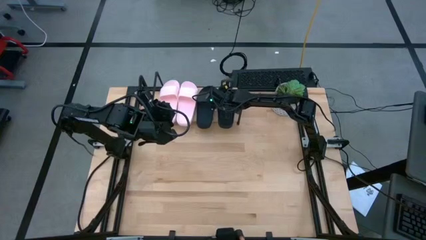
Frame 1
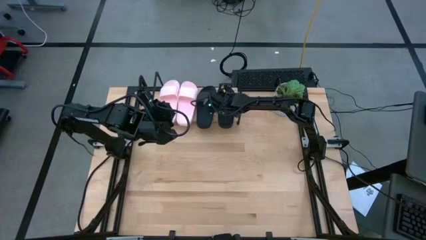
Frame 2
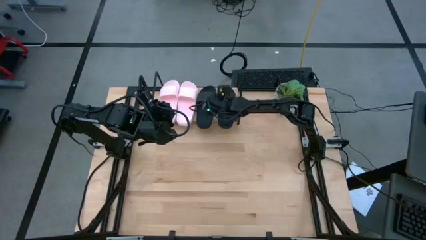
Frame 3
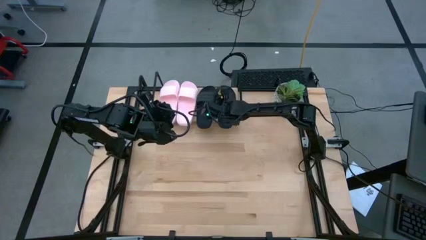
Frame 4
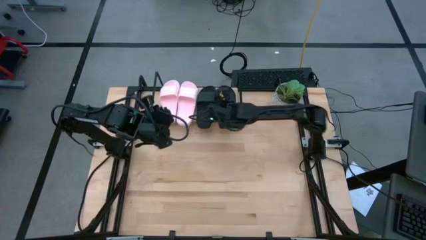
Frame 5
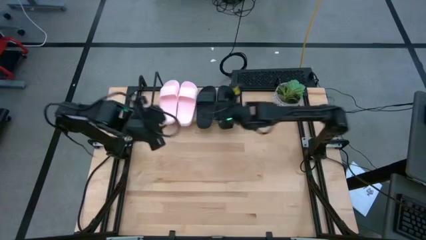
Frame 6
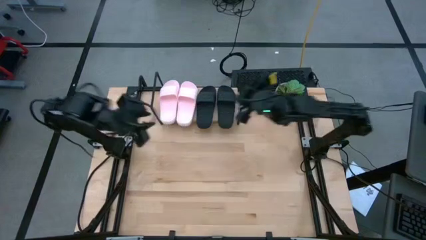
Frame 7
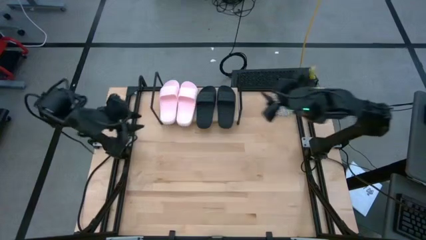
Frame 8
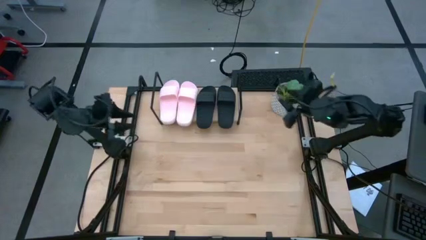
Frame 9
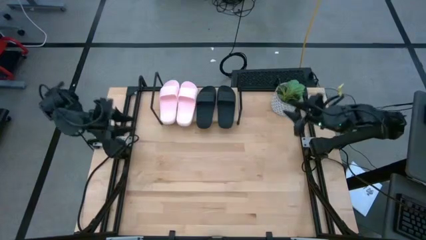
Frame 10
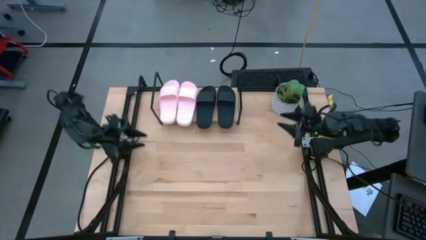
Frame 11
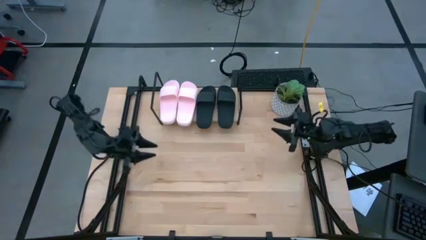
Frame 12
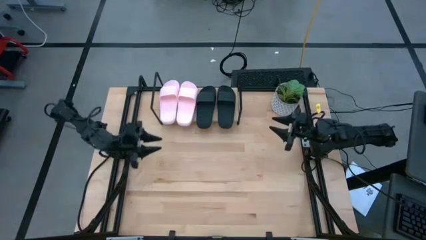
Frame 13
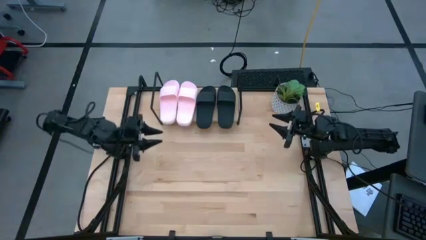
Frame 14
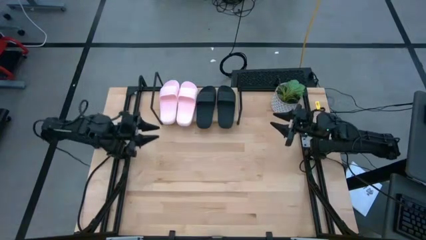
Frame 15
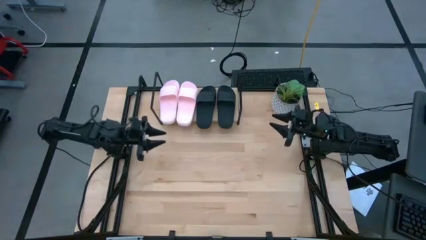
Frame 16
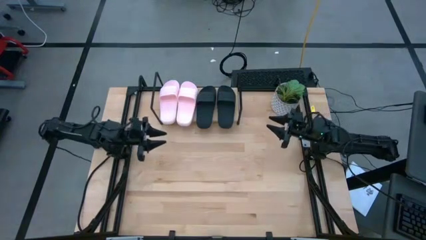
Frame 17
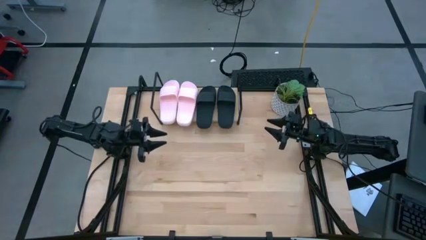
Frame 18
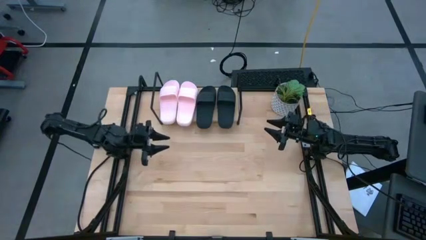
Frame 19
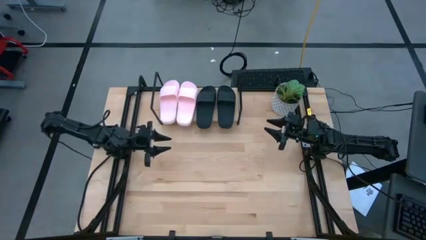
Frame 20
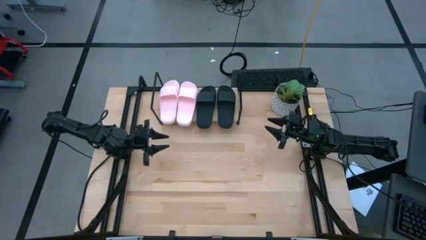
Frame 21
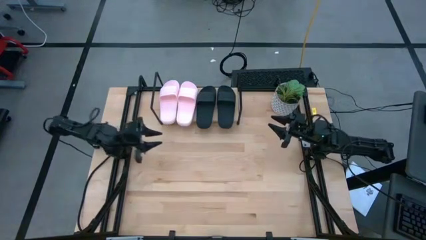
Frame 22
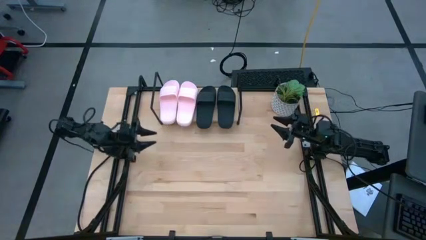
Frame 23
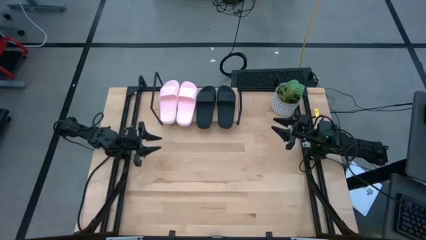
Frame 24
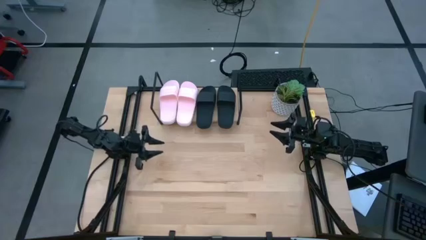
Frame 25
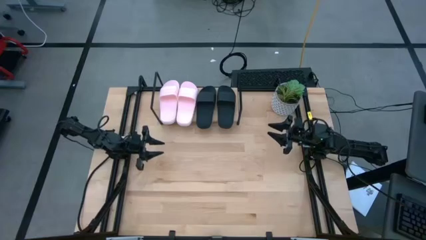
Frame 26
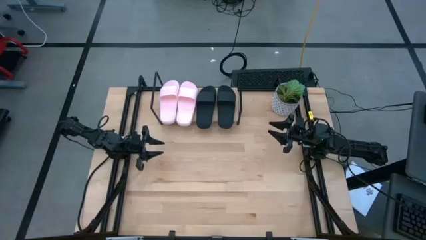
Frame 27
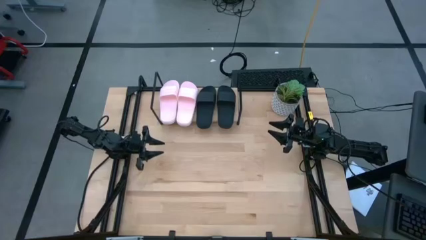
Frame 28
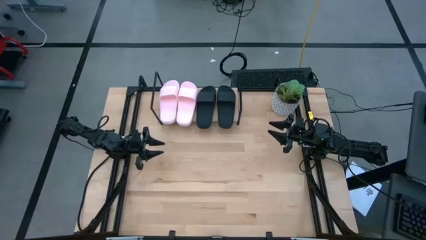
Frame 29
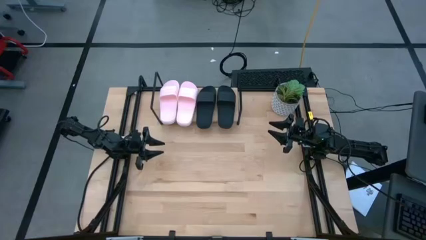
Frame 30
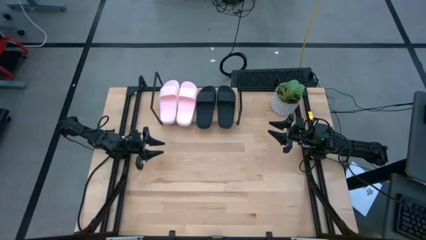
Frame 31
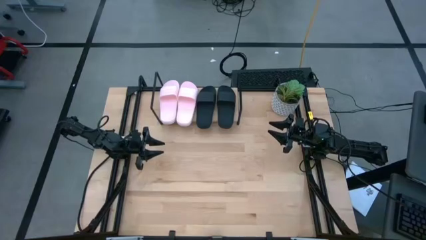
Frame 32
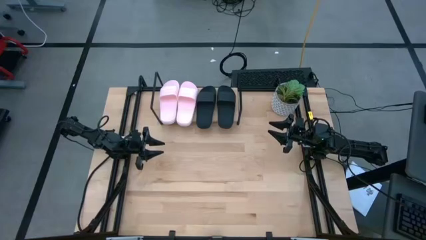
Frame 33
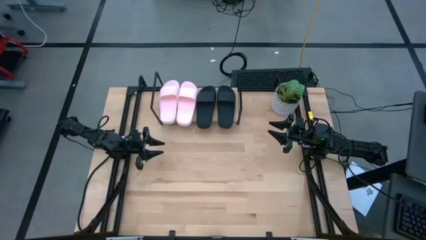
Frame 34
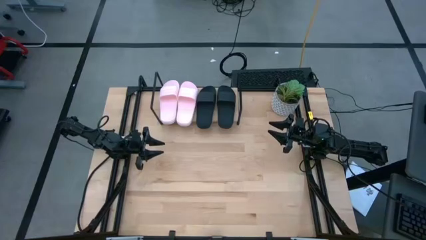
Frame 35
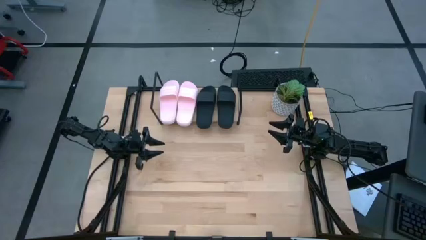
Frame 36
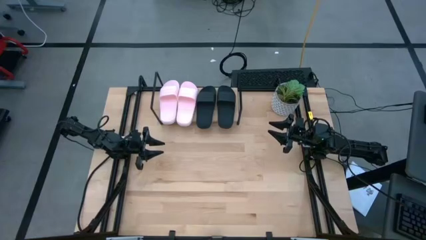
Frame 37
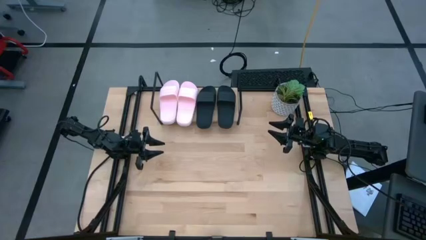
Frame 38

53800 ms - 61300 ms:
Task: Pick and place slides into the shelf
Return to Home Position

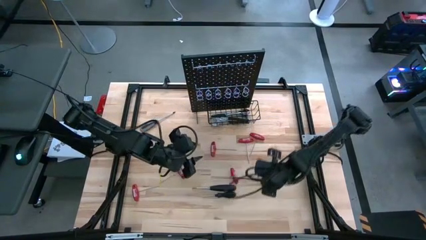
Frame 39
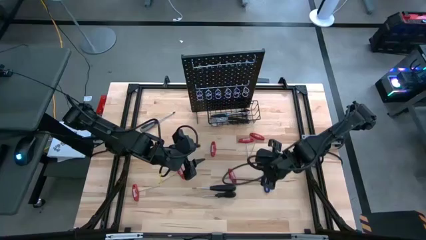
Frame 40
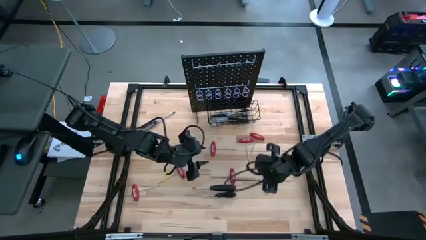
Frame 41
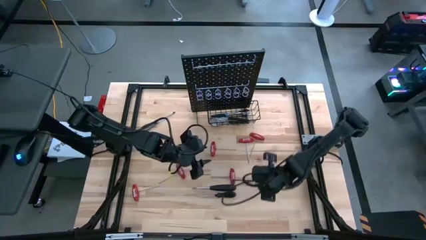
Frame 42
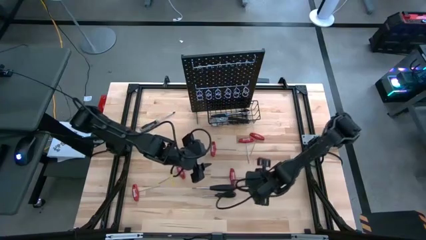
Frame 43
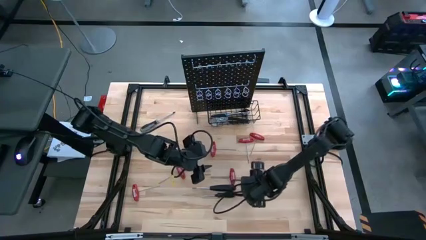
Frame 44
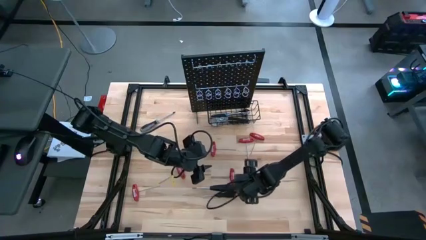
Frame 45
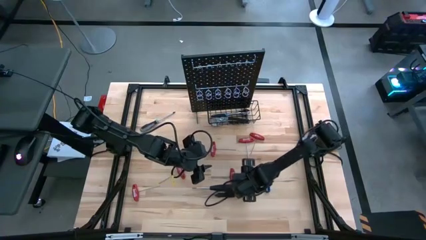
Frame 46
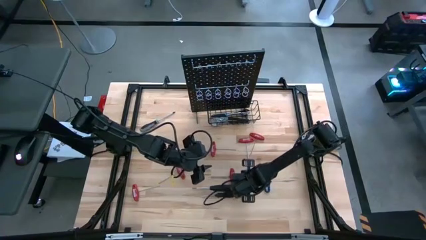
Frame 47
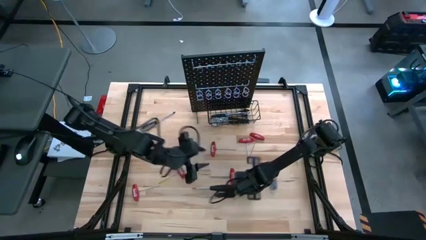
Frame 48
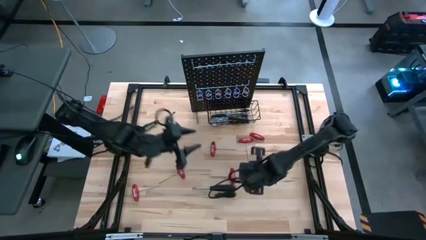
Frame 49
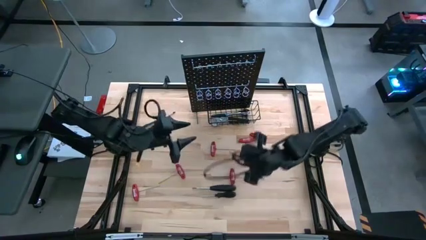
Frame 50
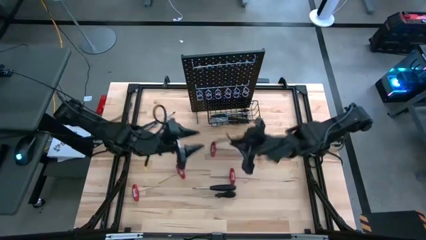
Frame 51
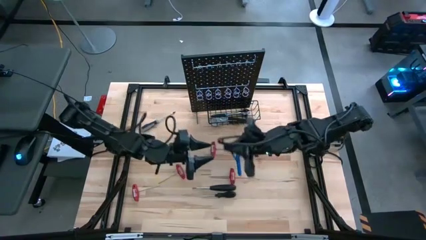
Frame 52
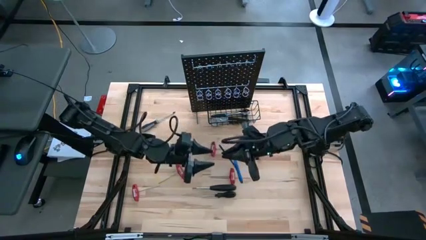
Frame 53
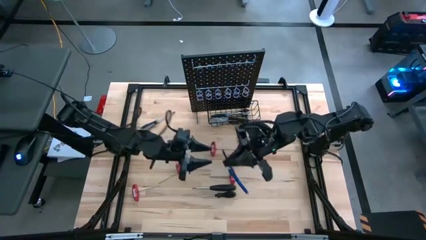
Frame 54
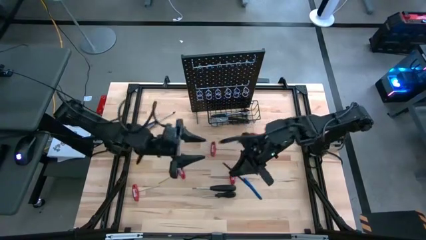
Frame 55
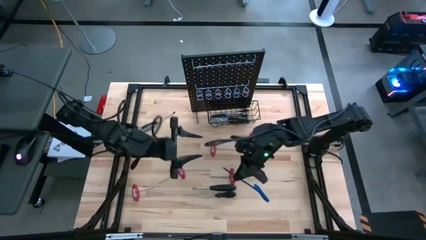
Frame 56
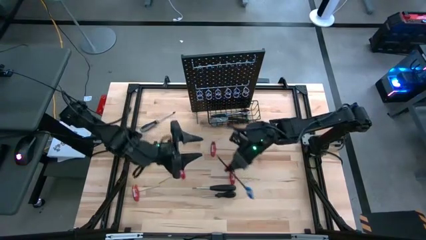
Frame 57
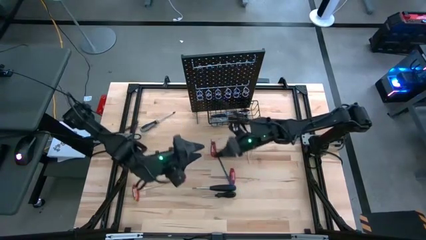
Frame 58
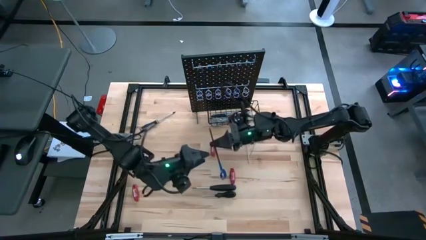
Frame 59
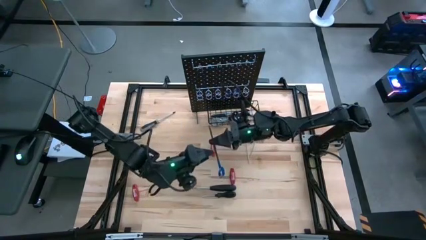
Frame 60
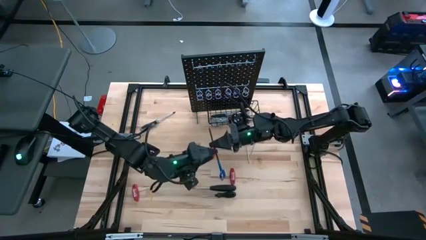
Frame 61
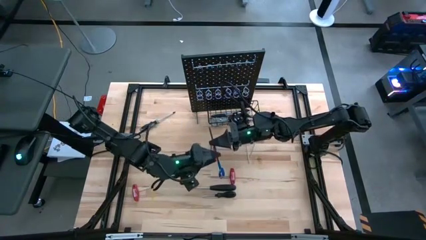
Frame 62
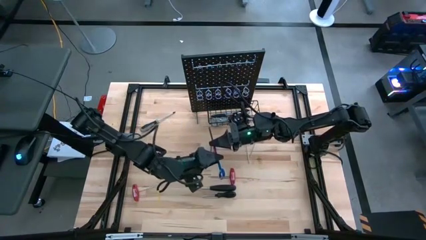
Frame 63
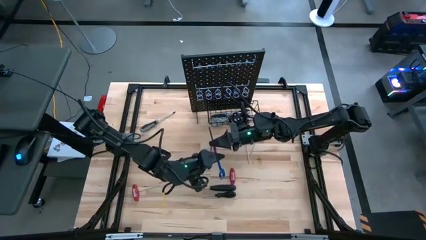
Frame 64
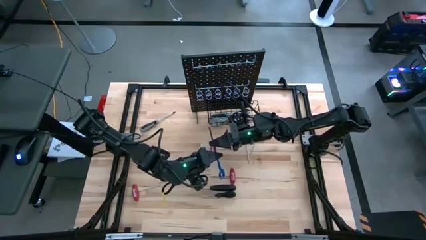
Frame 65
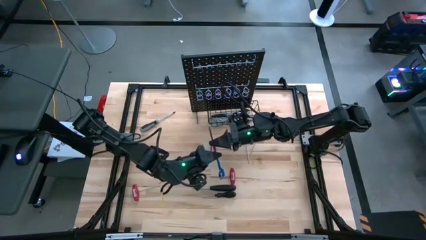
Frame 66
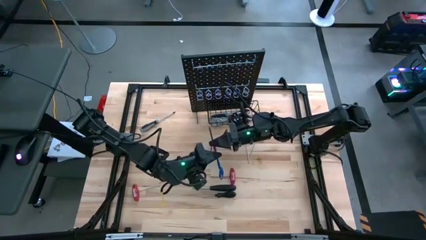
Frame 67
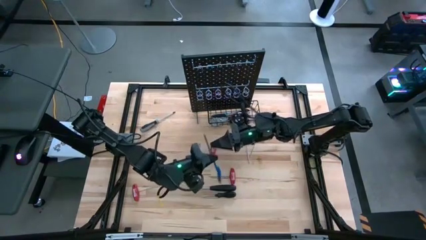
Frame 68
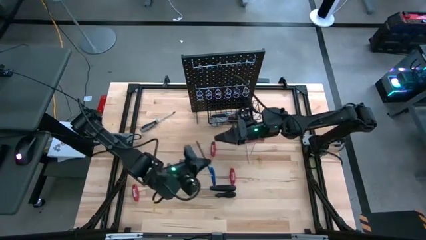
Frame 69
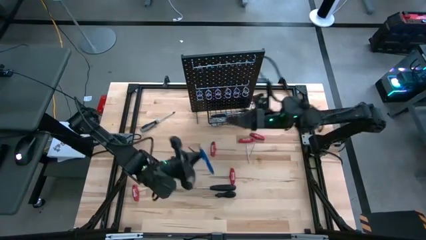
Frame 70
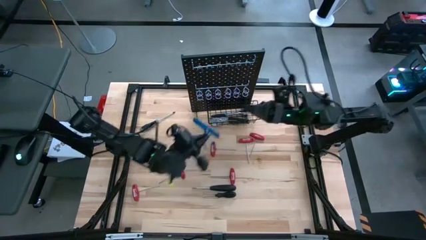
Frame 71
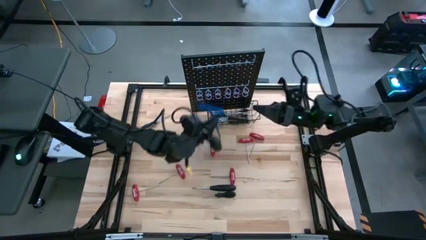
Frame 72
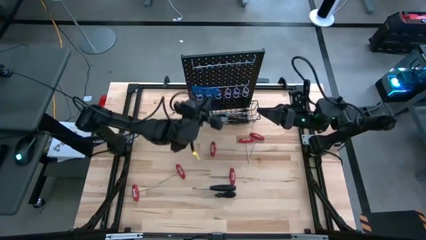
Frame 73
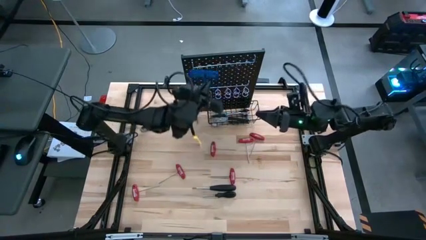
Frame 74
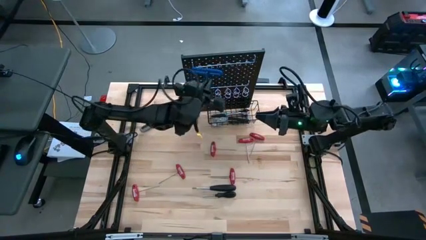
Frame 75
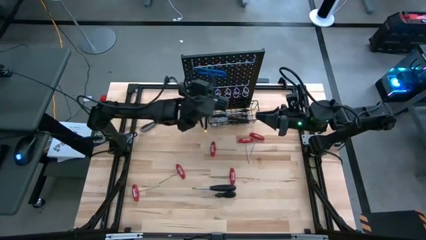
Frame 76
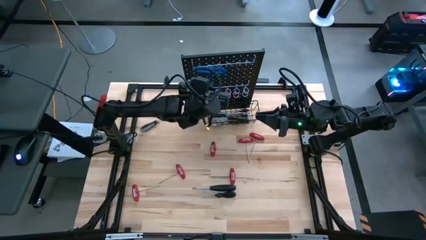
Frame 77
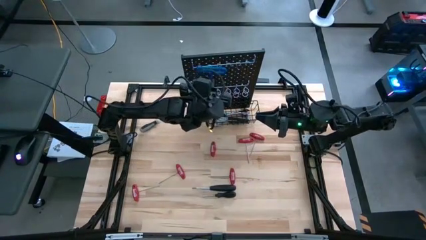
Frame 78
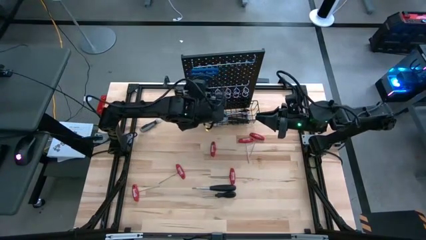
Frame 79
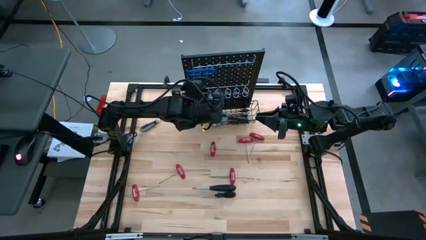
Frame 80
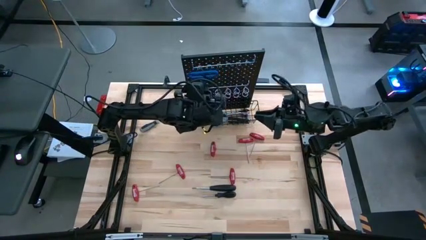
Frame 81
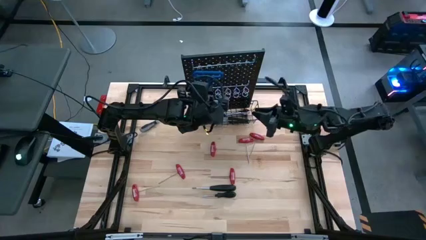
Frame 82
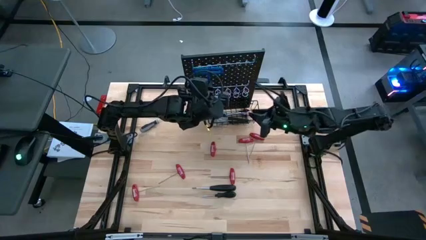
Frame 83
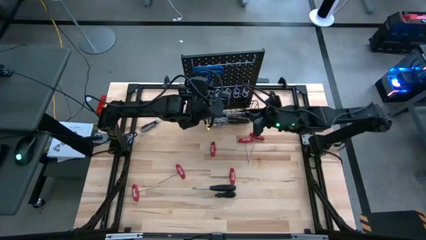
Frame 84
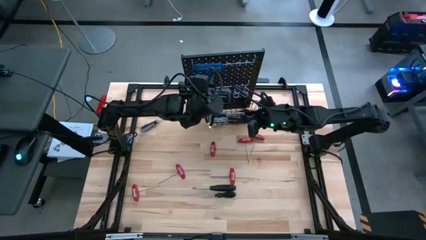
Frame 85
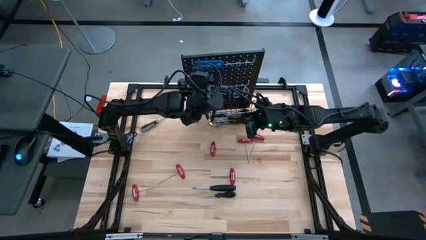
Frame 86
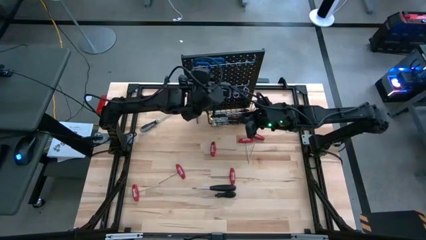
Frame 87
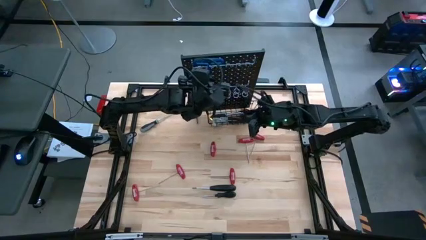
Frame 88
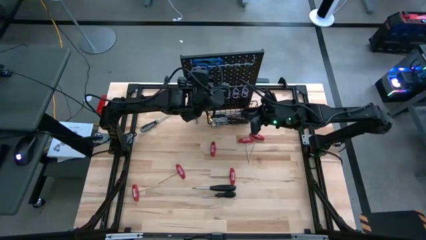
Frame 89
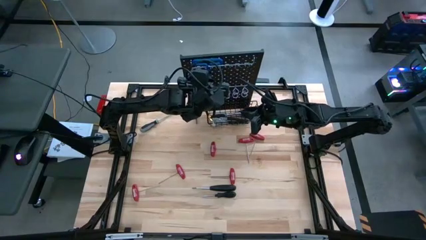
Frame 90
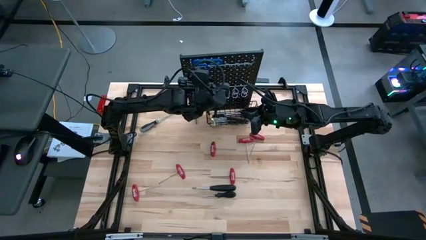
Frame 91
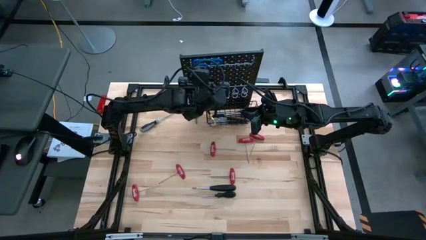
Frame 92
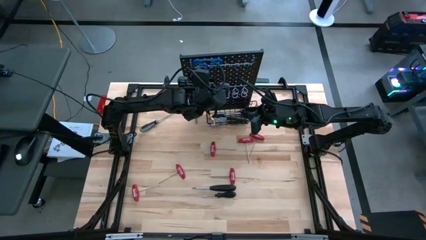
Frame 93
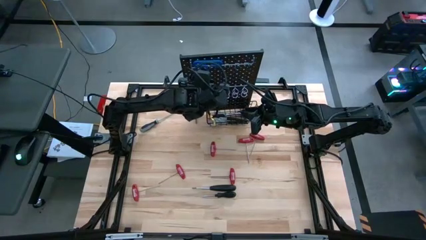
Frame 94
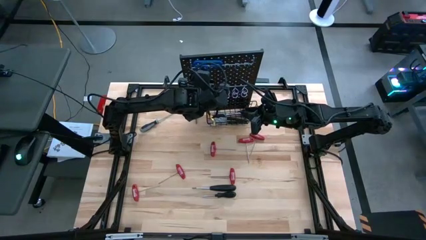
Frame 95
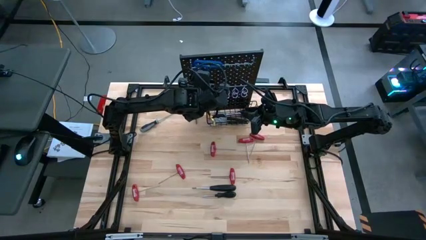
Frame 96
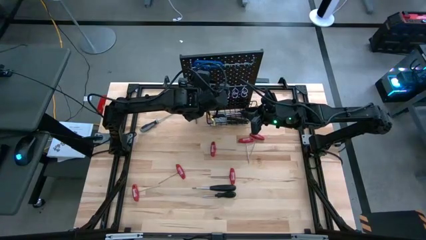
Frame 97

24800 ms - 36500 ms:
Task: Hang tools onto peg board
Hang the blue pick tool on the pegboard
